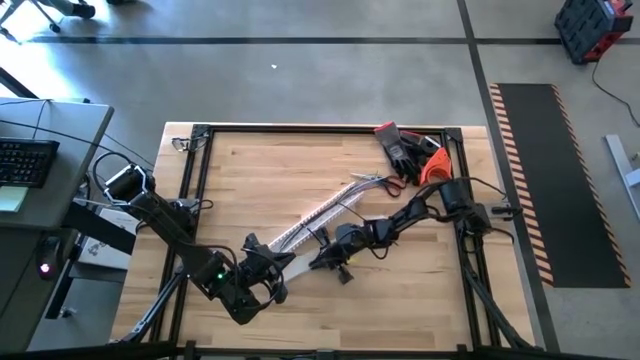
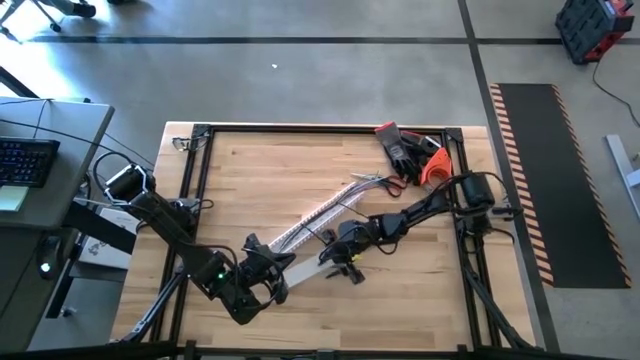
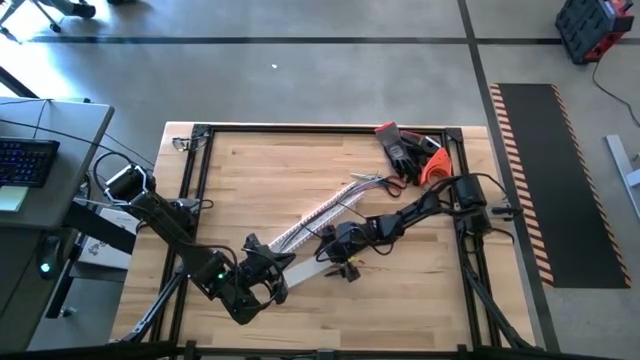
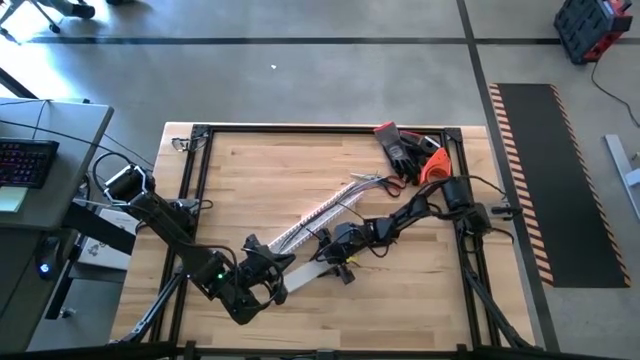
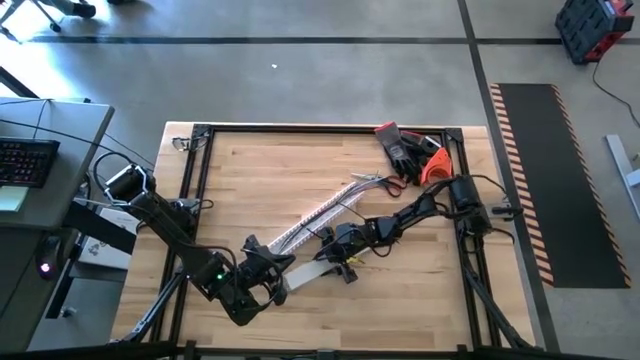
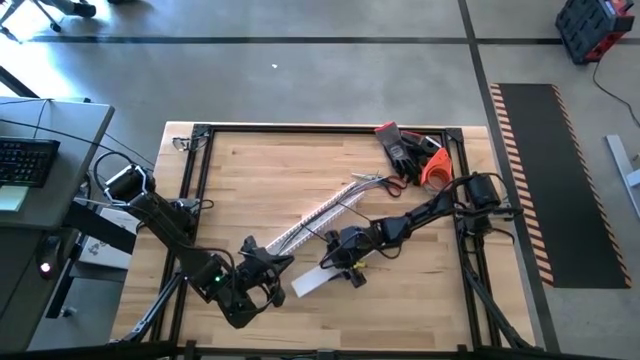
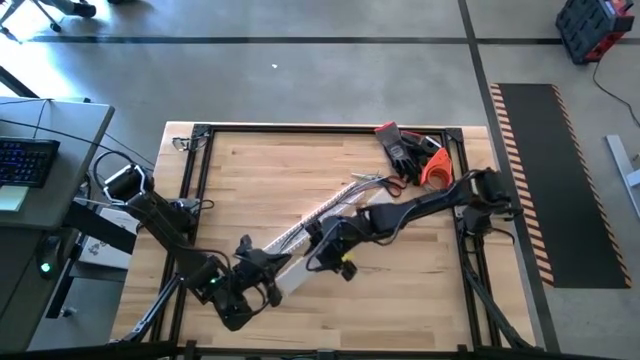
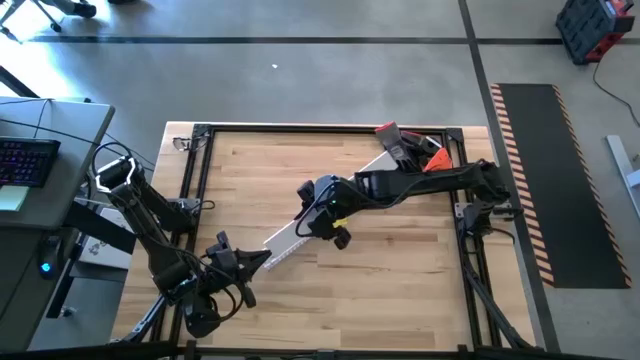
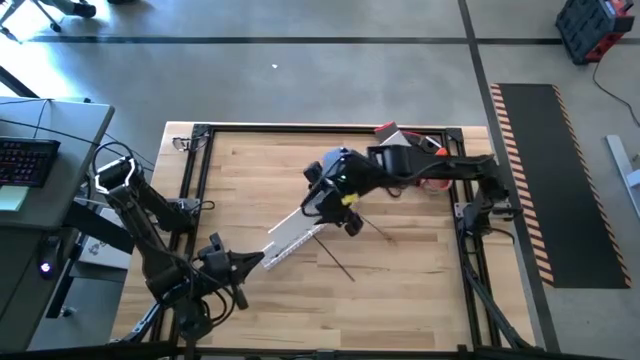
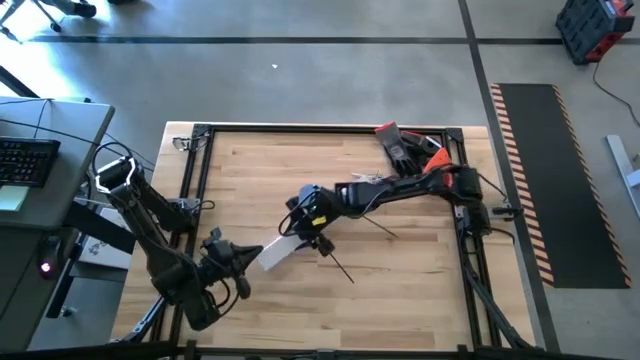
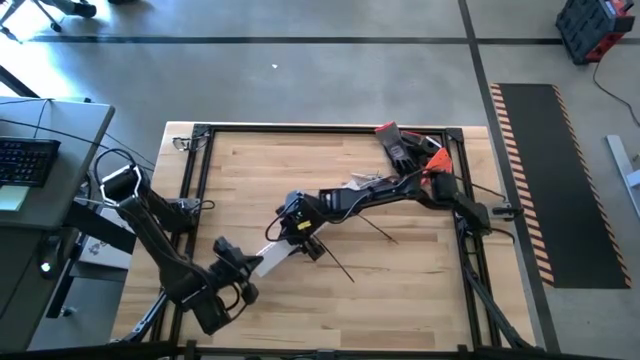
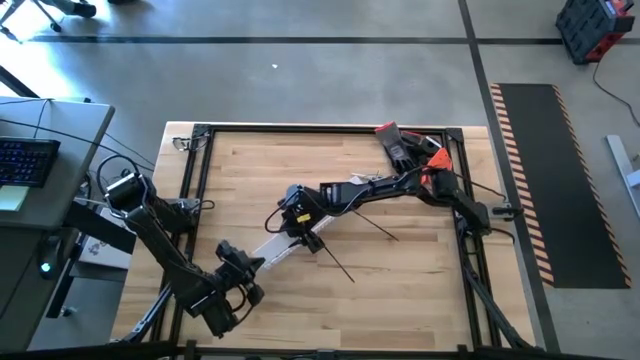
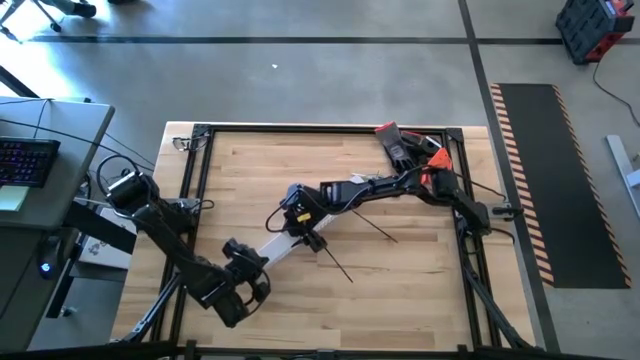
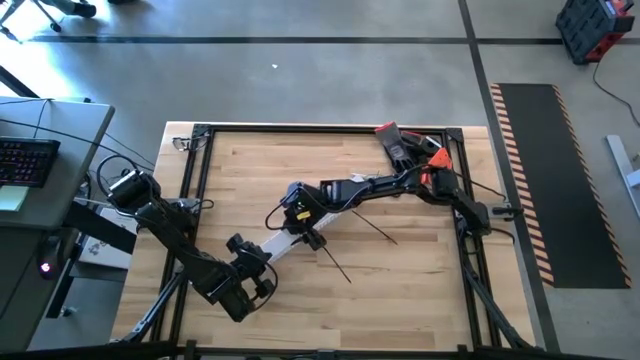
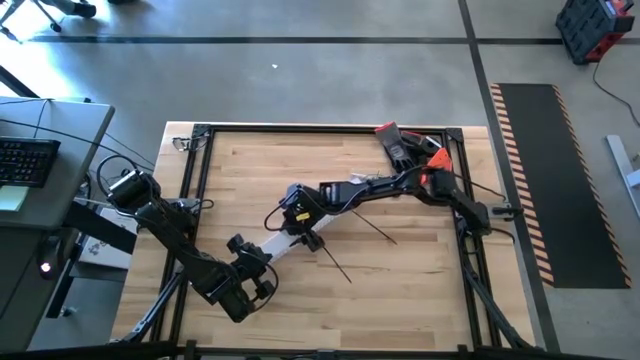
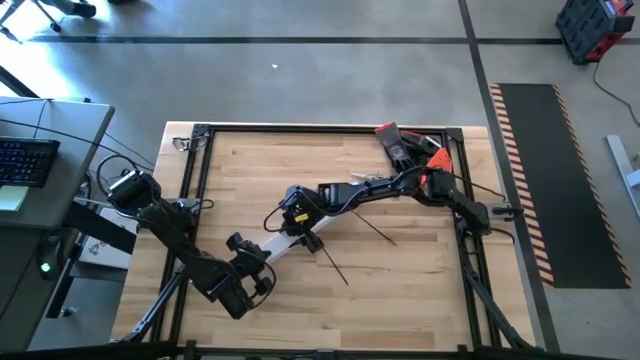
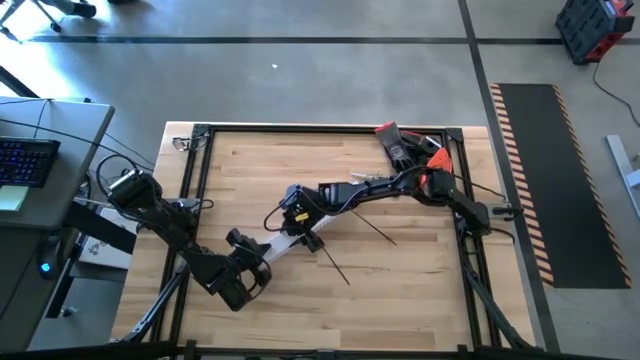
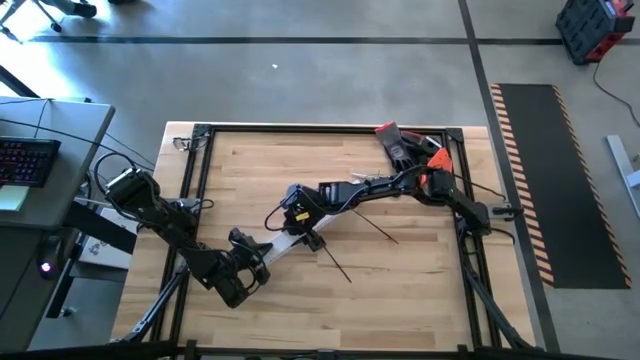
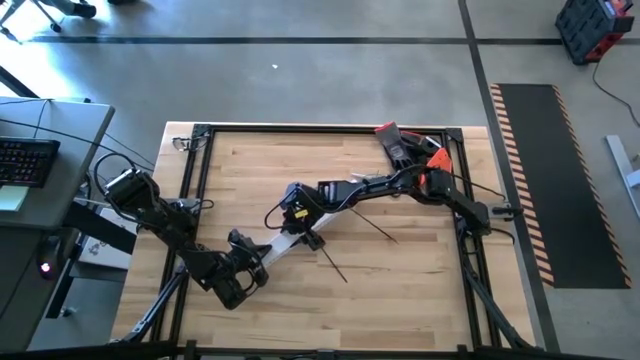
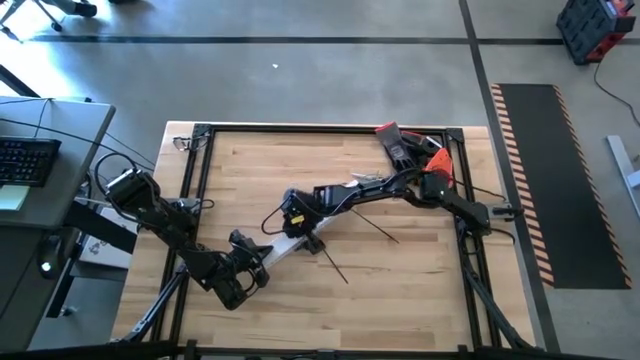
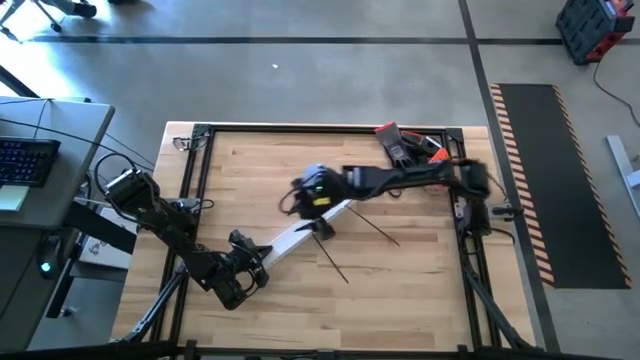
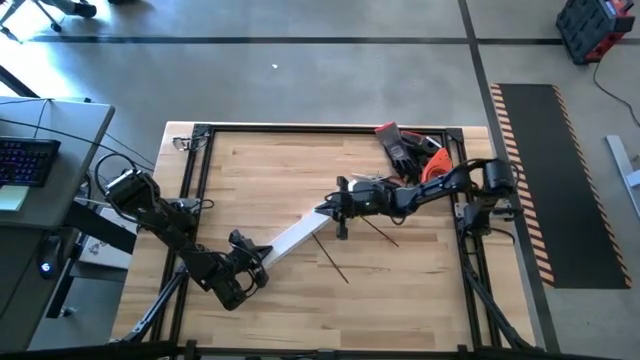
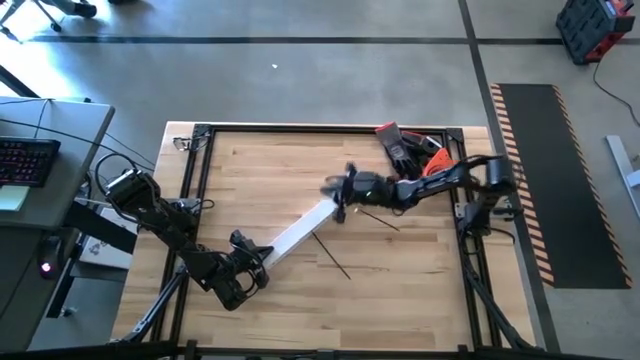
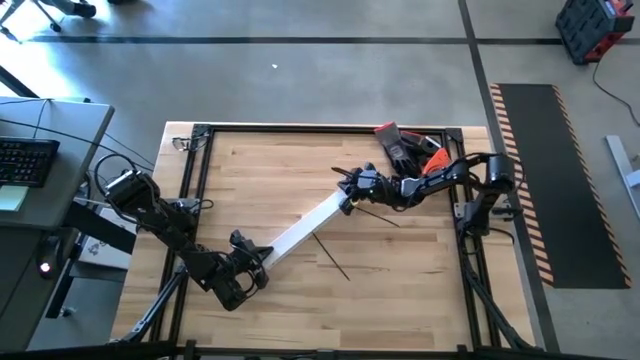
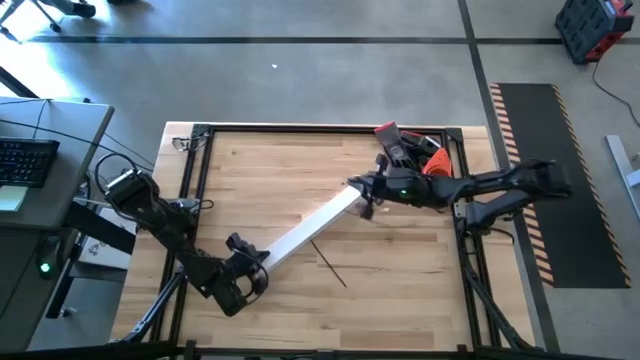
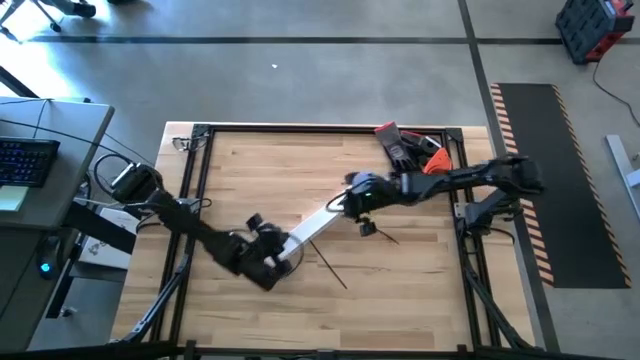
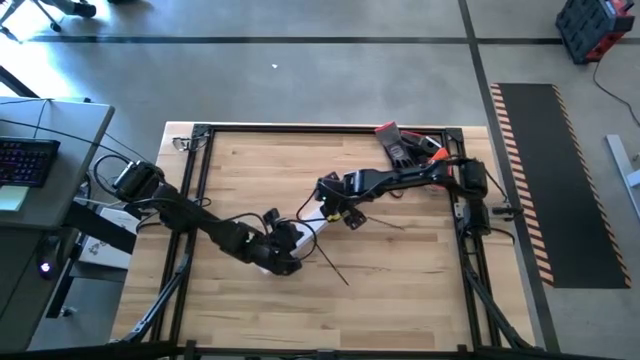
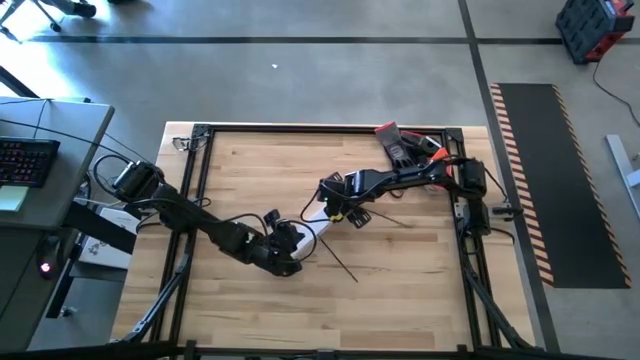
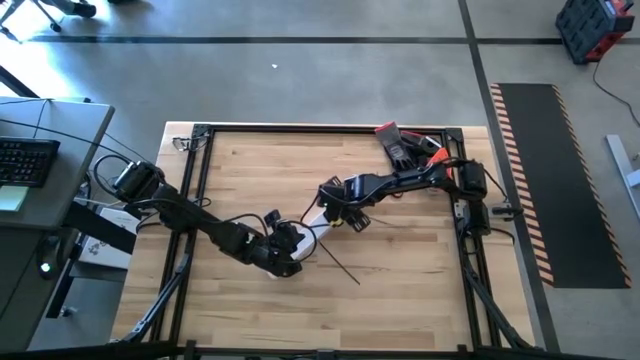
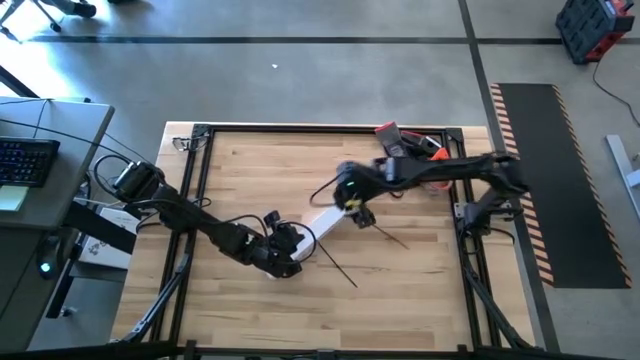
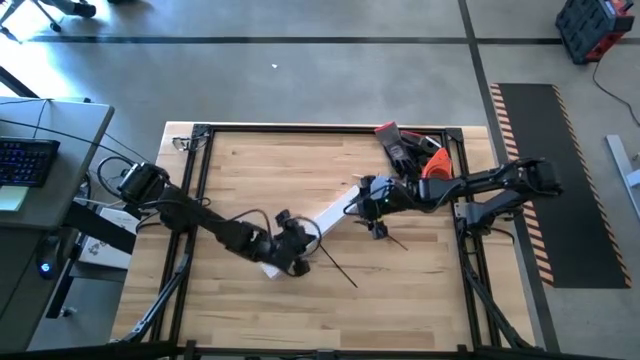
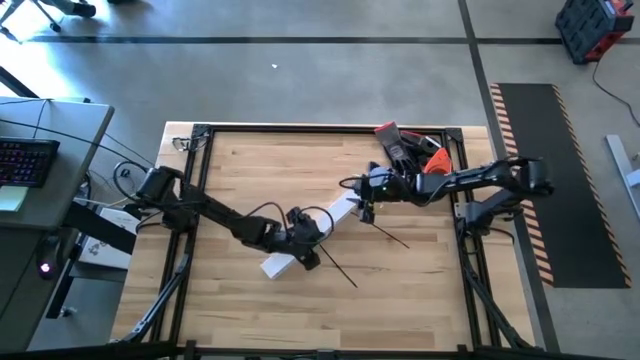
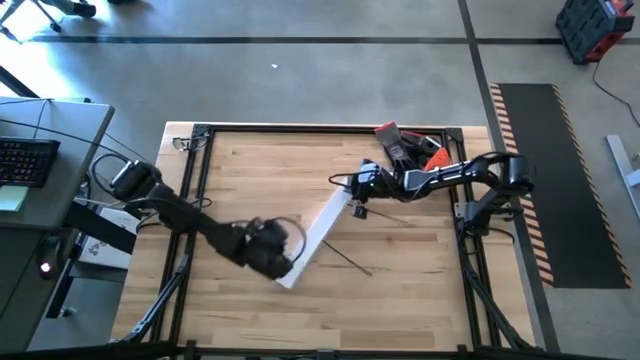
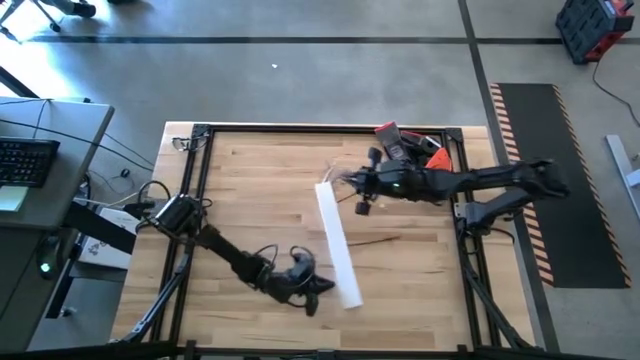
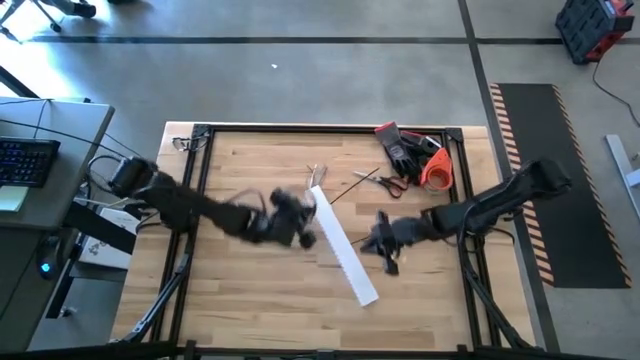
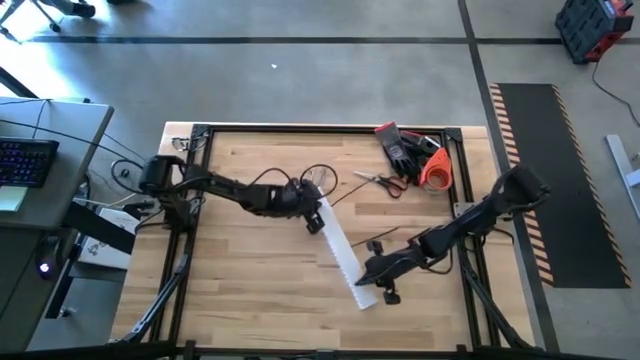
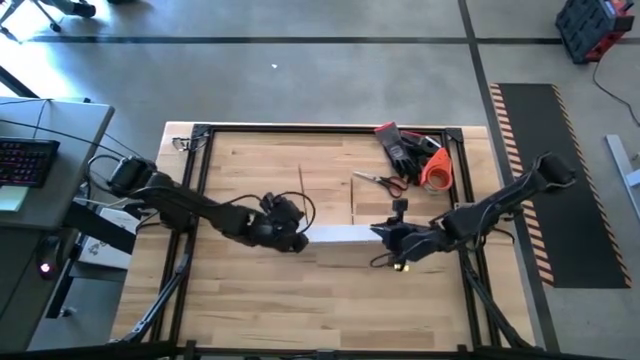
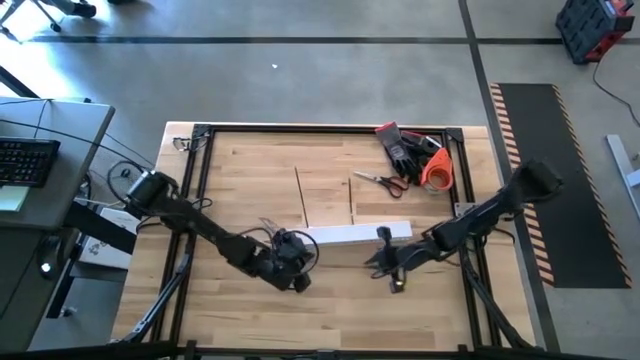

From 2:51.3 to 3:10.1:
Task: Ziptie cables
Close the white cable duct

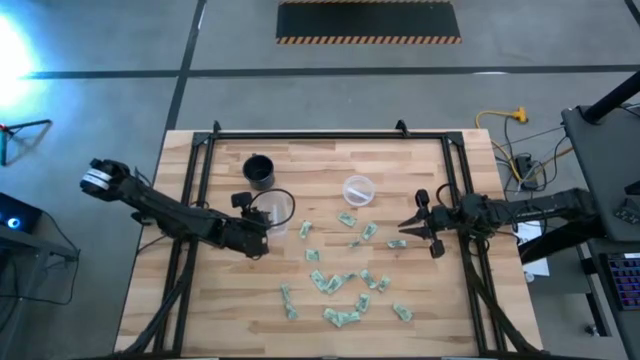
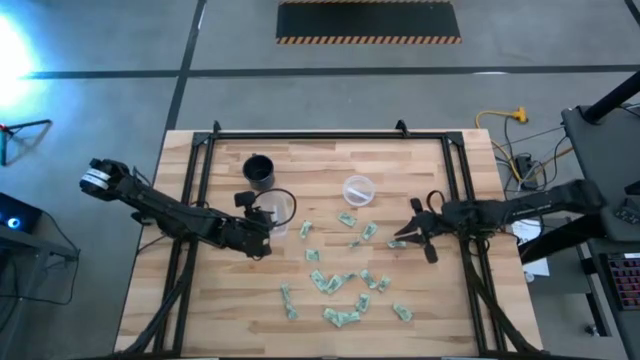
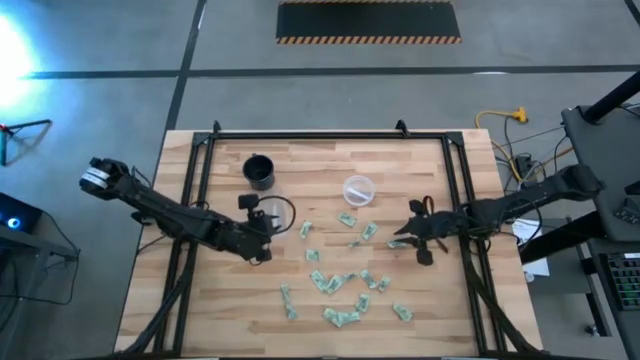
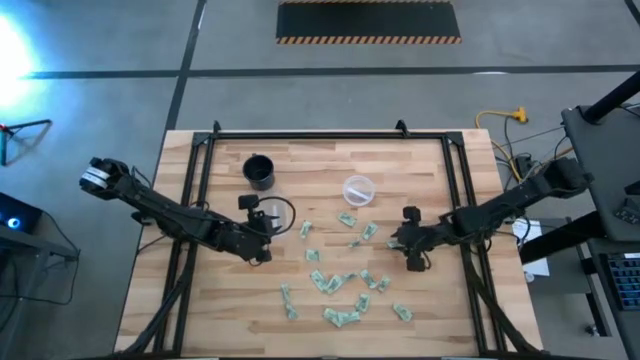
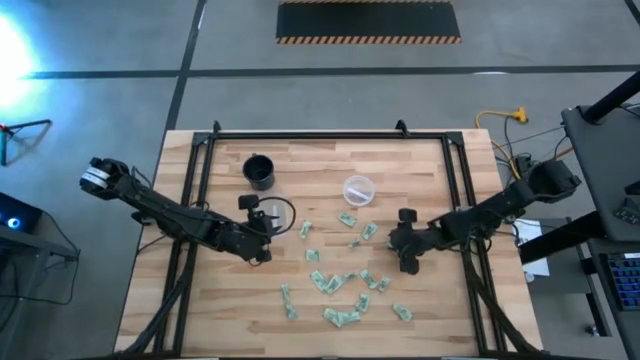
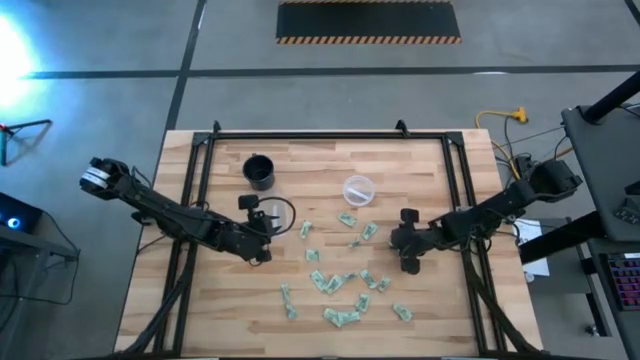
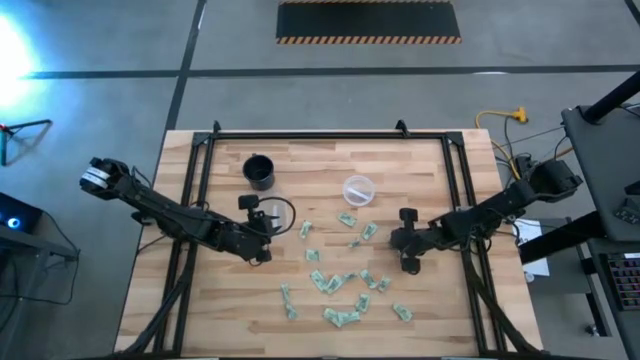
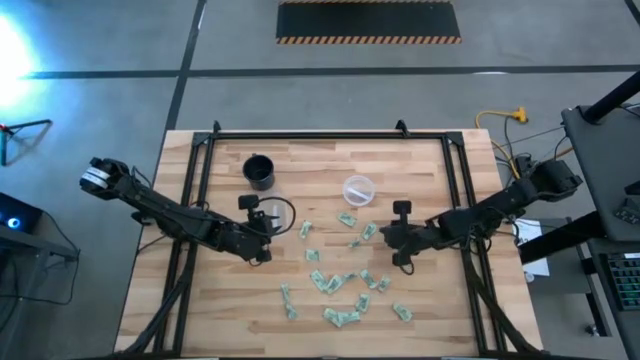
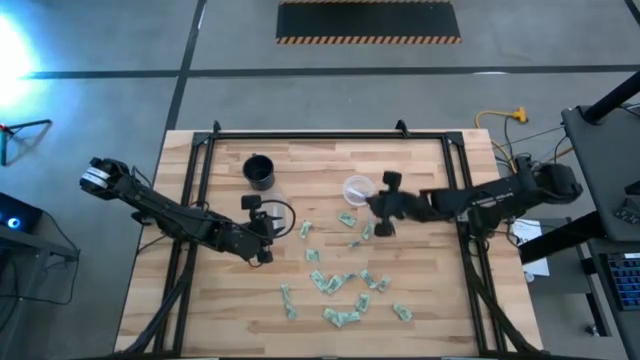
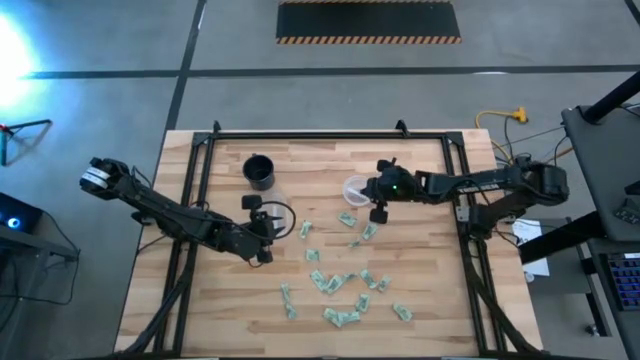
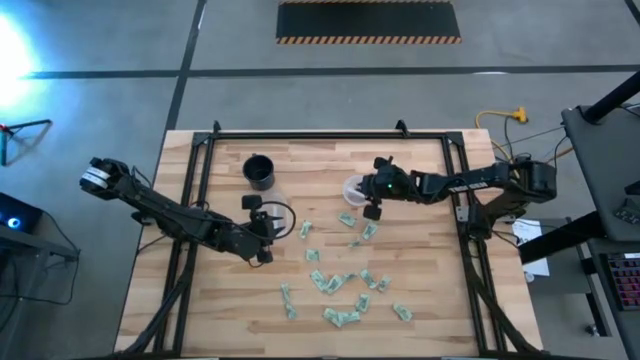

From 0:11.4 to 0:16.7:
Task: Pick and place items into bin
Put the stevia packet into the right transparent bin
